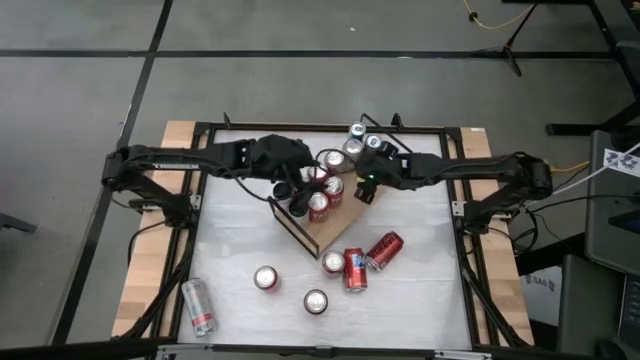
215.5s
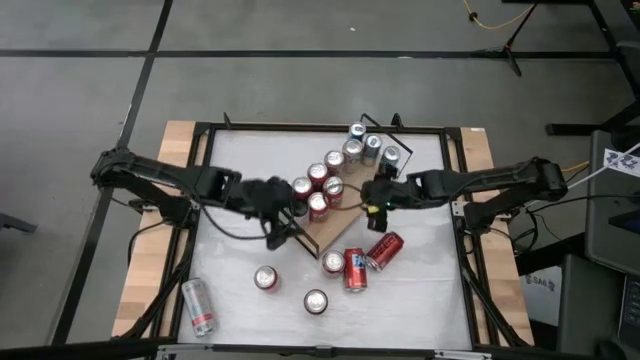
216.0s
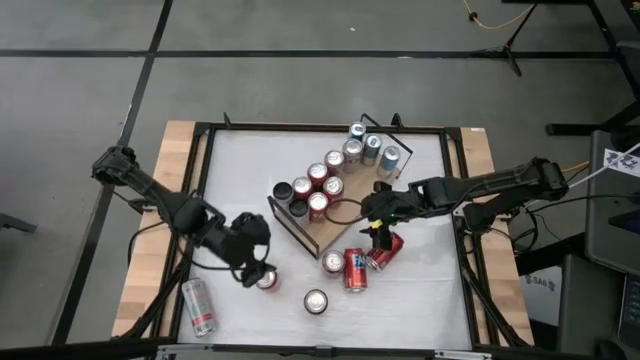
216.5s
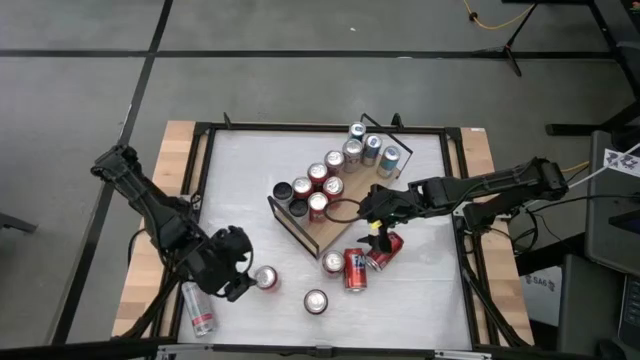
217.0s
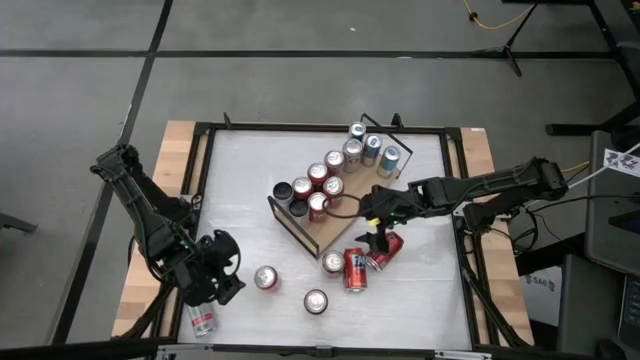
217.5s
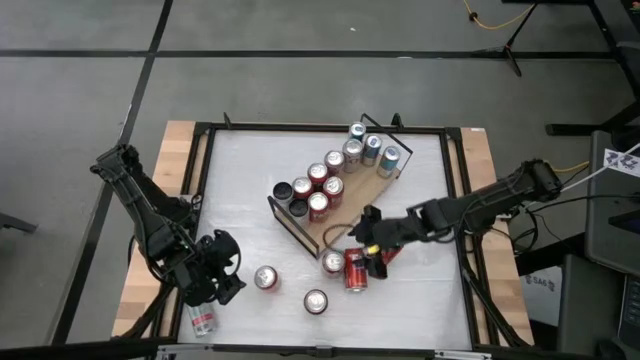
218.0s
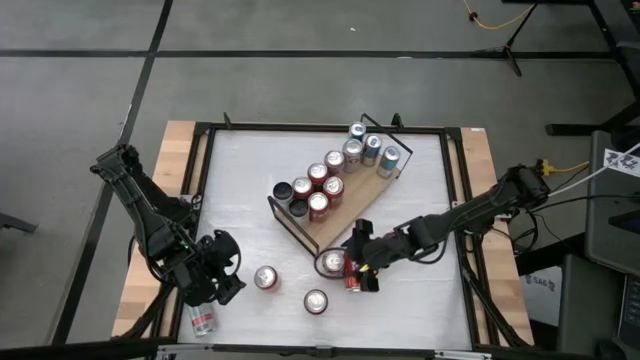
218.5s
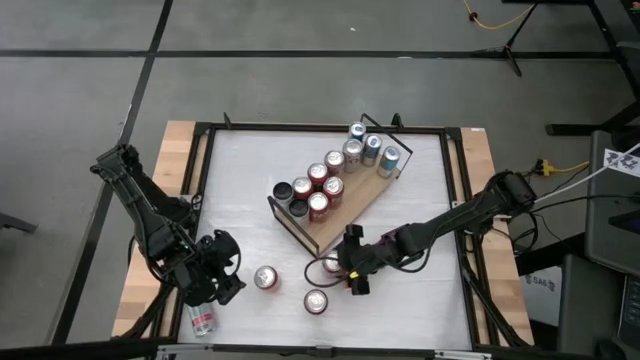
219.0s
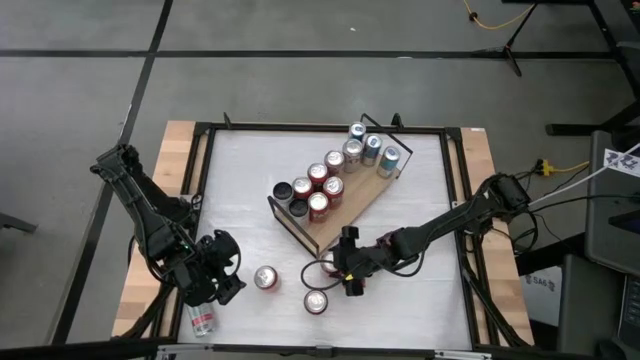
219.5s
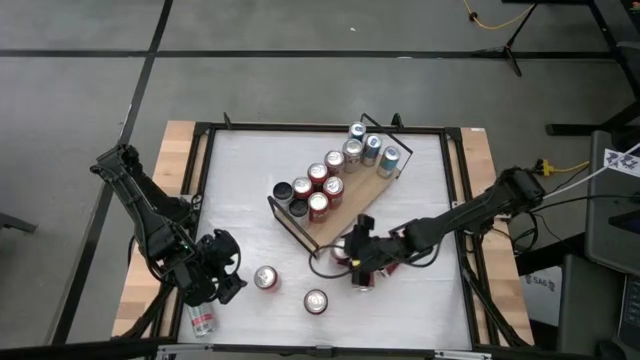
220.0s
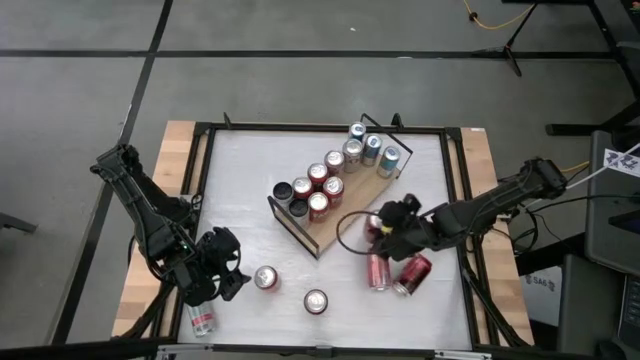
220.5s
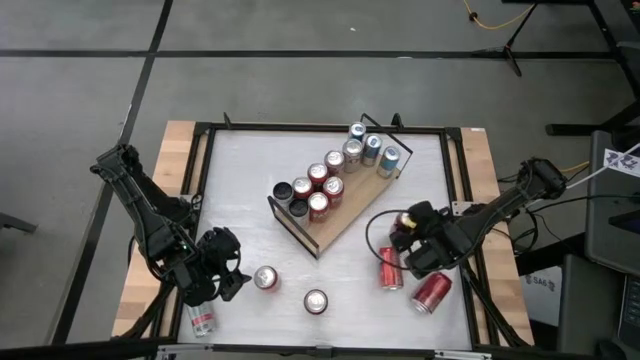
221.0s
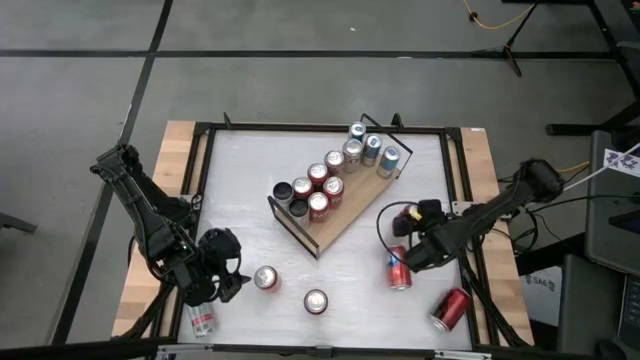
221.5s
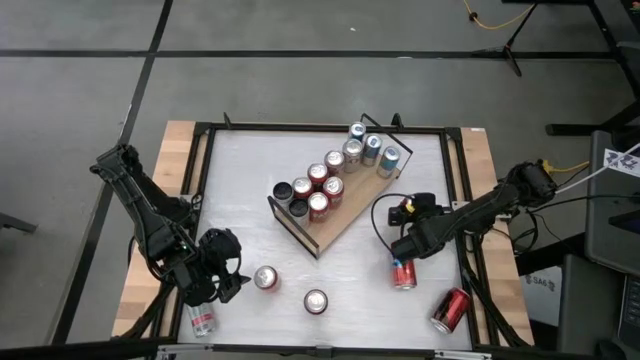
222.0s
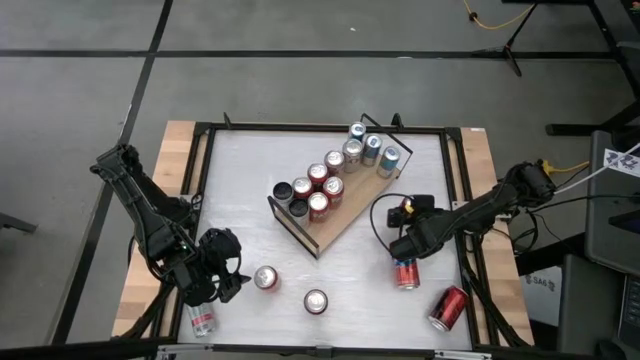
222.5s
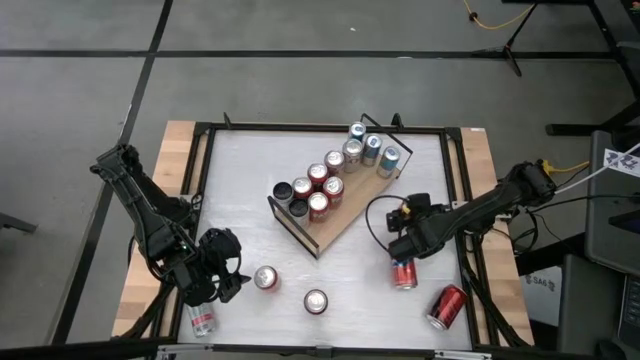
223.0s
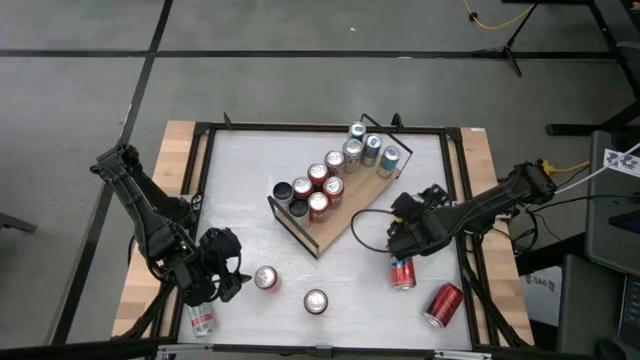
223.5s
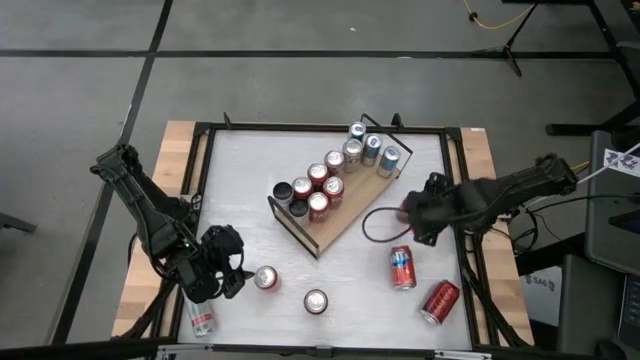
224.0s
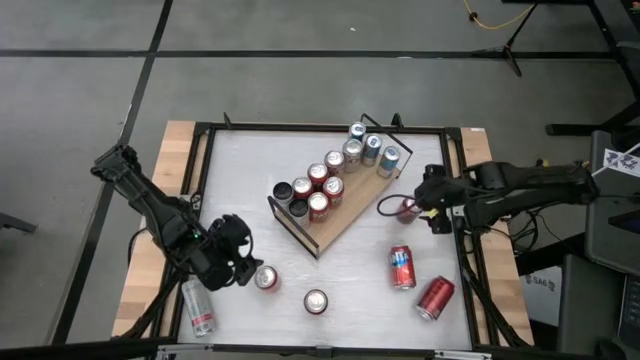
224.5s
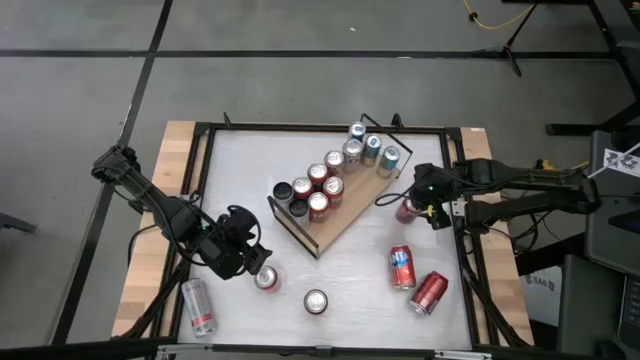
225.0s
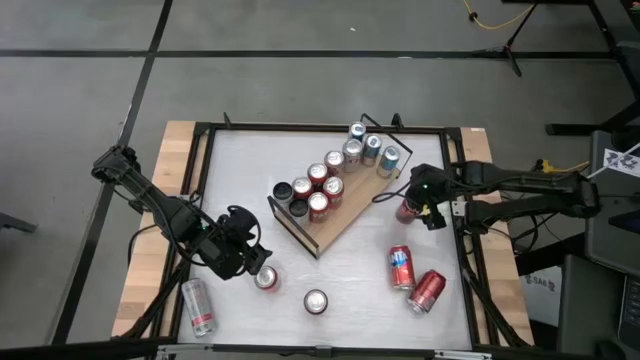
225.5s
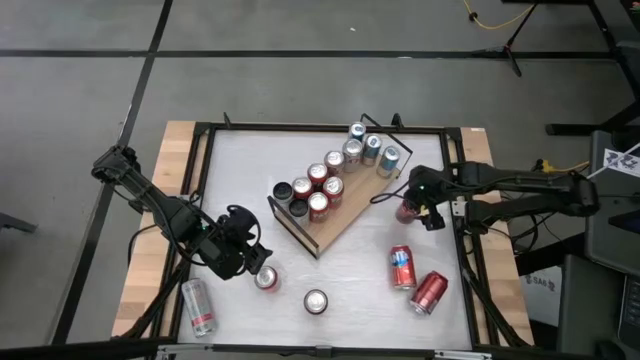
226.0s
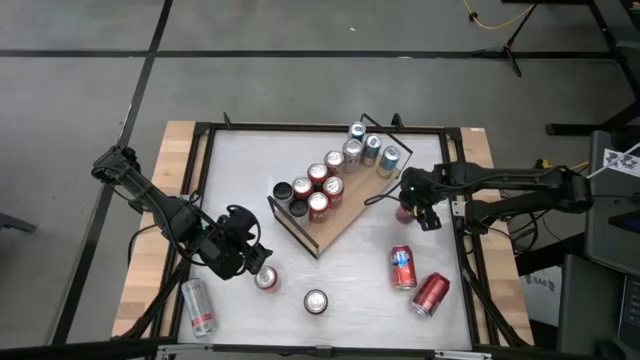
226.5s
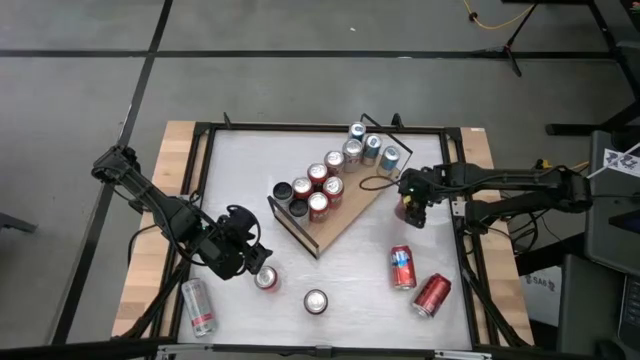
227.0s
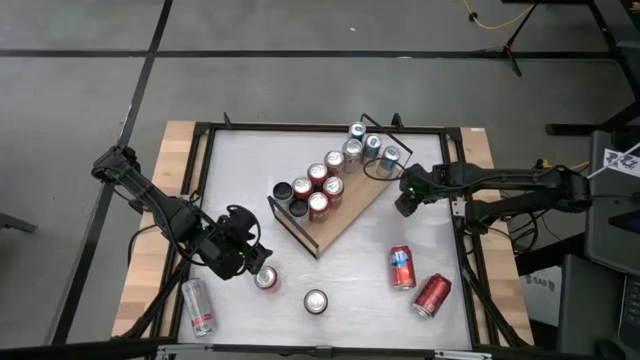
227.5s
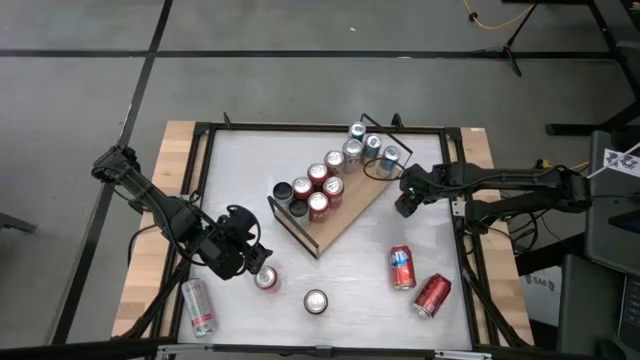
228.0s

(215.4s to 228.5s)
Task: Place canned beverage on shelf
Move the red white soda from the middle to the right table

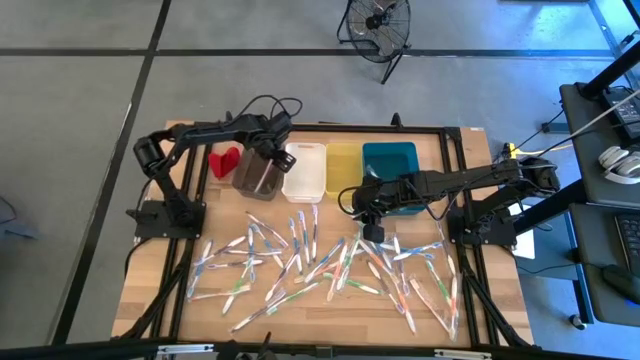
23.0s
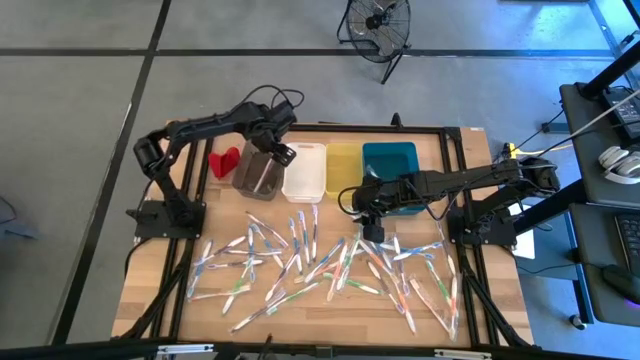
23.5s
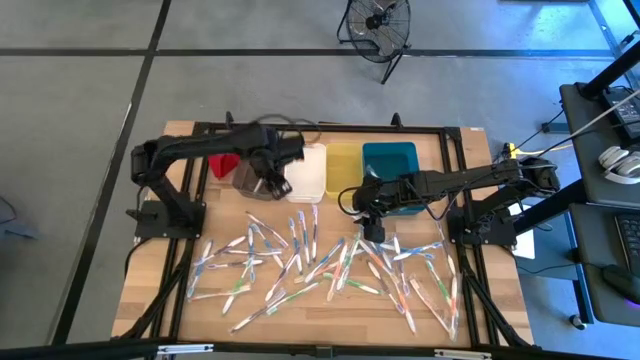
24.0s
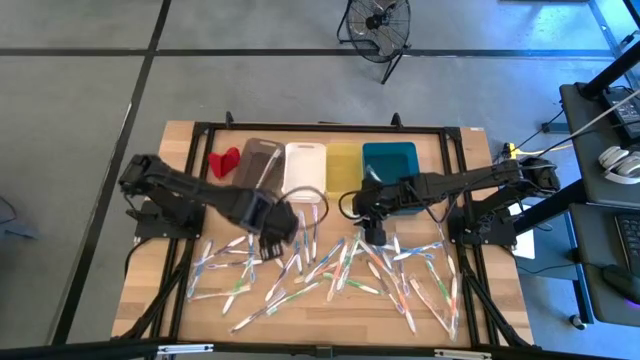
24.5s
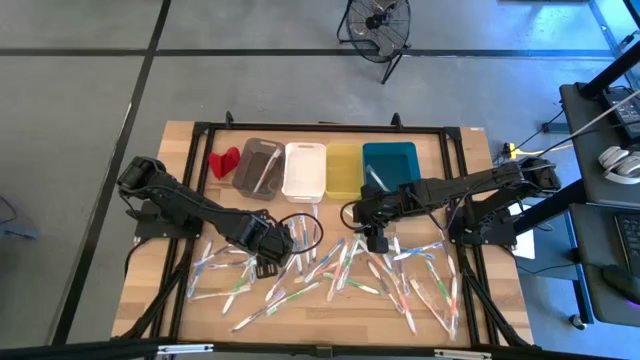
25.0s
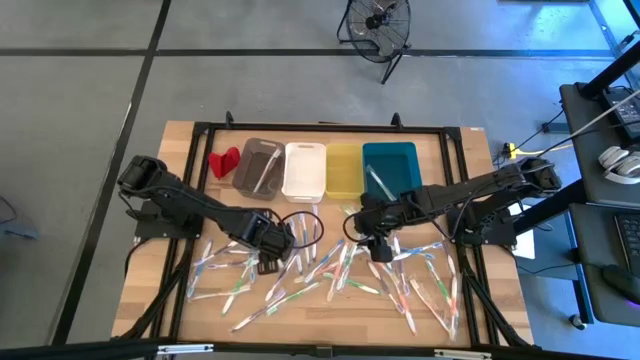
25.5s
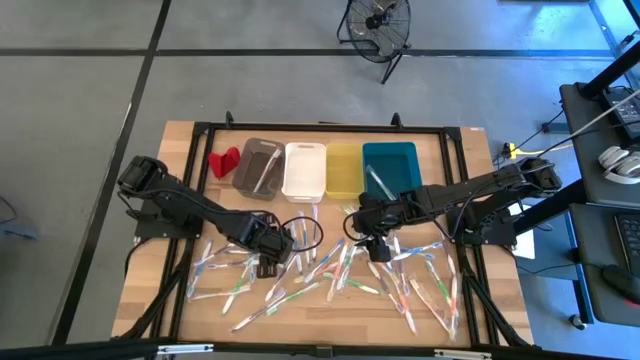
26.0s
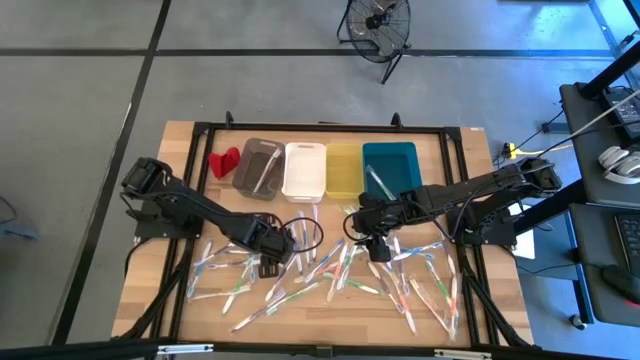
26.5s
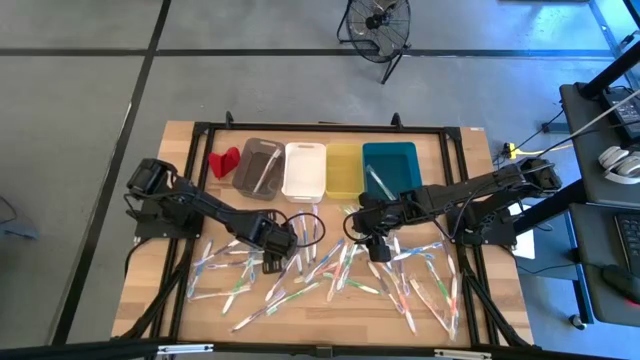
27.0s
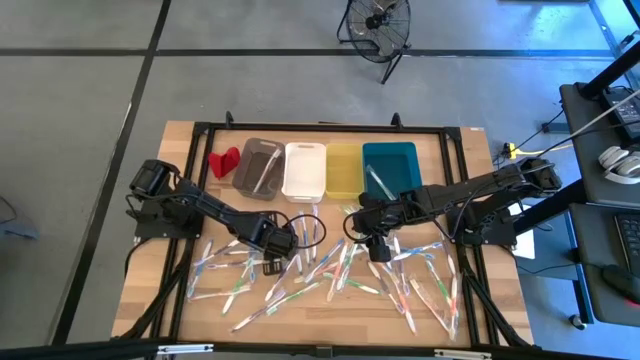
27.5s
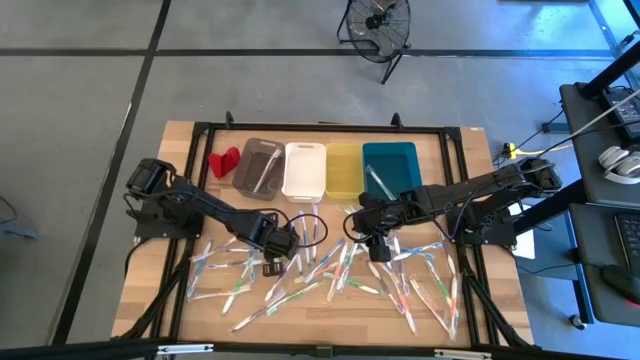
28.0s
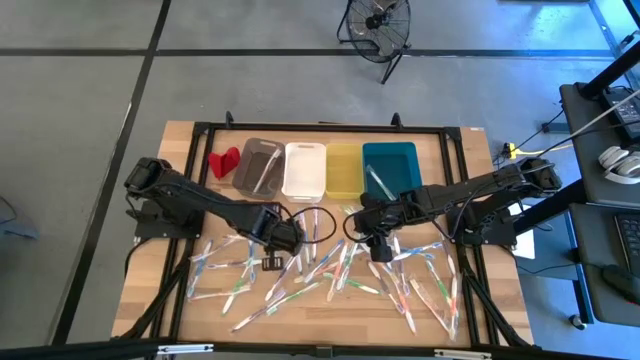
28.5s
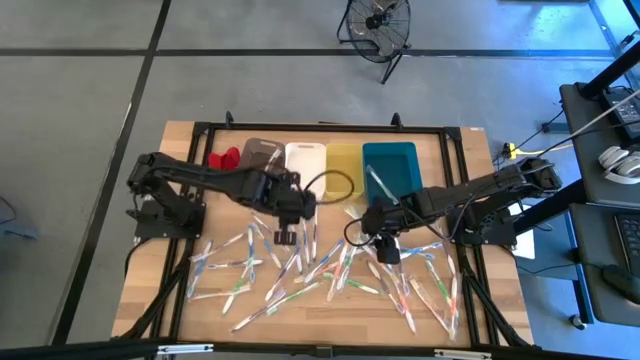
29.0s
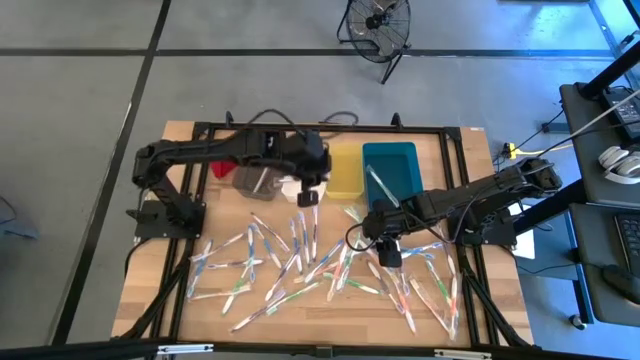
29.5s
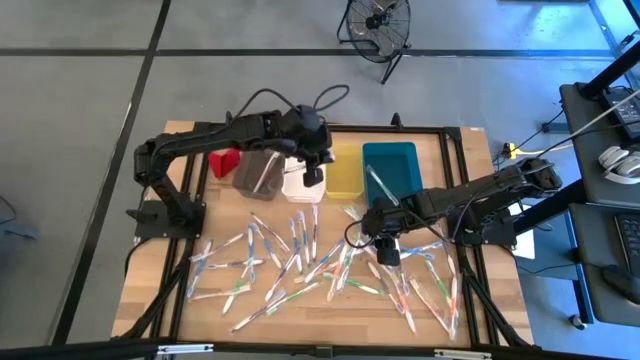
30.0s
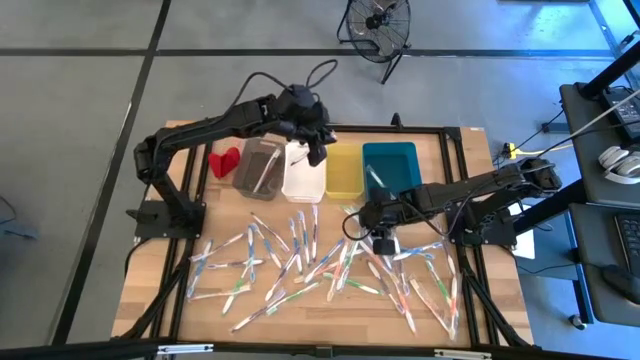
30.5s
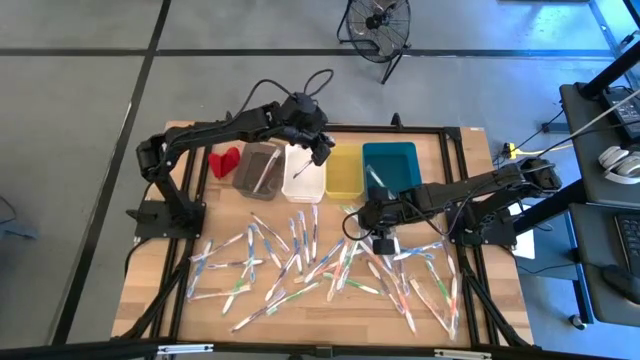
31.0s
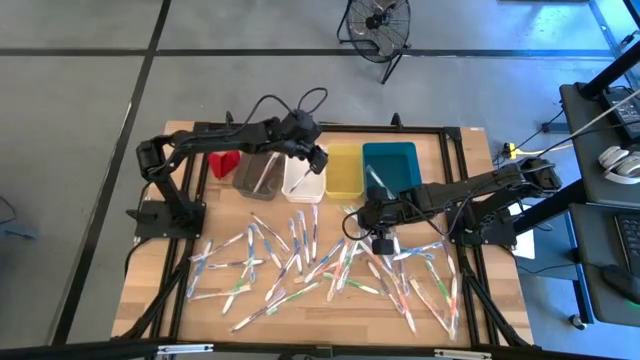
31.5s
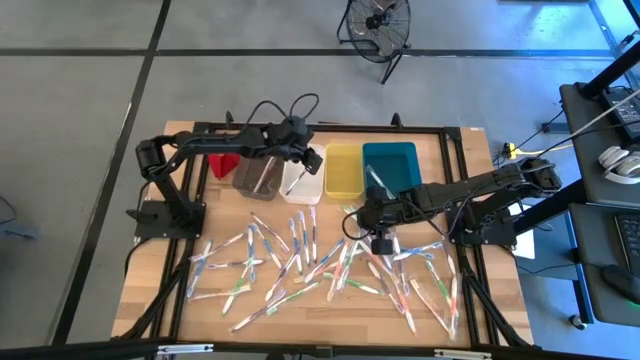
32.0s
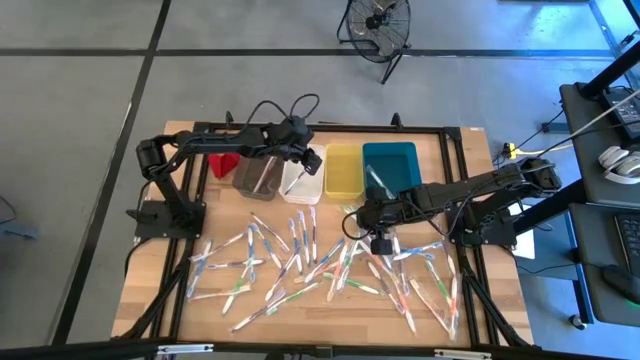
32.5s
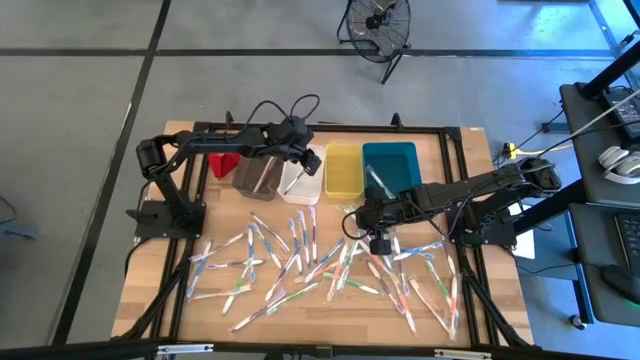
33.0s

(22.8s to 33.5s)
Task: Pick & Place Toothbrushes
Put the purple toothbrush into the white bin
